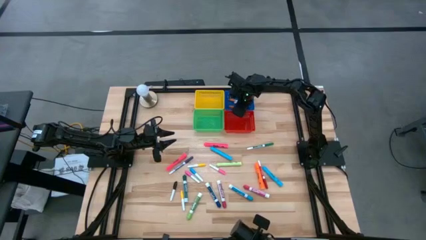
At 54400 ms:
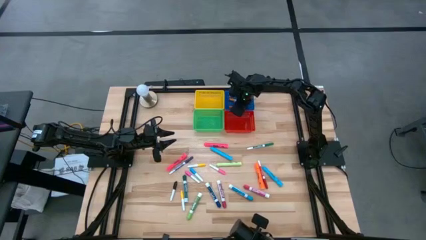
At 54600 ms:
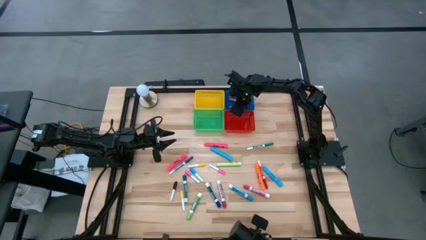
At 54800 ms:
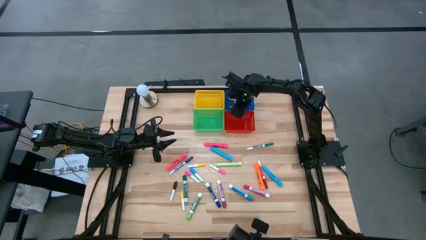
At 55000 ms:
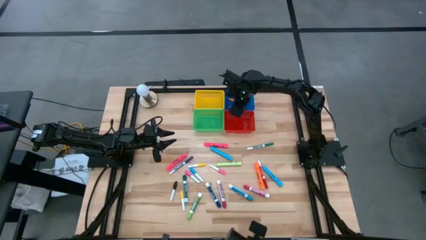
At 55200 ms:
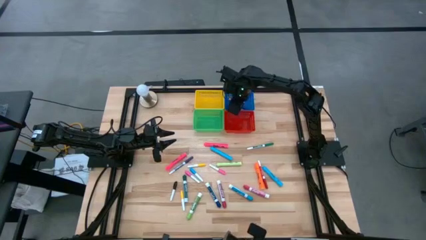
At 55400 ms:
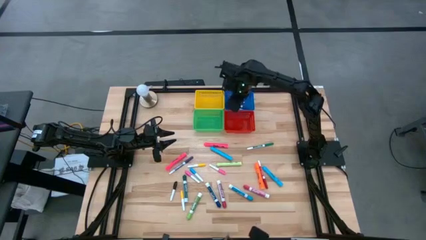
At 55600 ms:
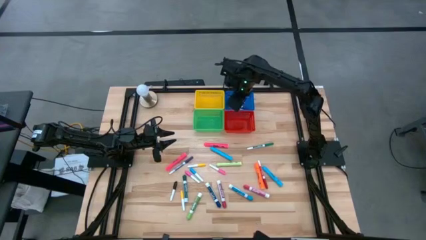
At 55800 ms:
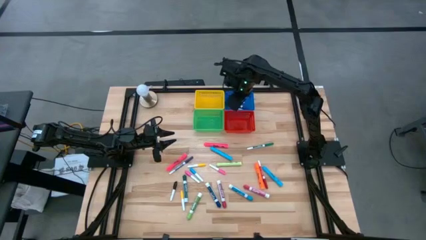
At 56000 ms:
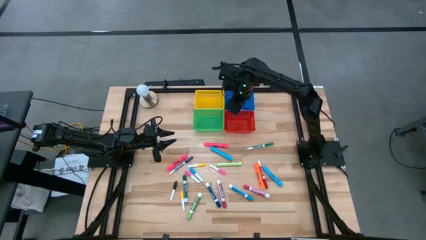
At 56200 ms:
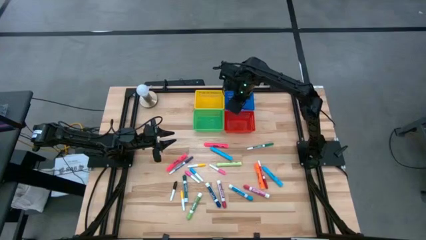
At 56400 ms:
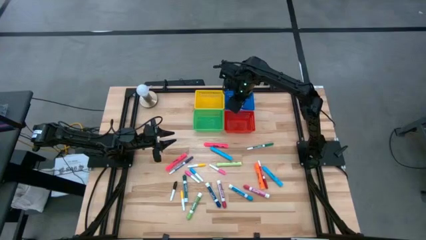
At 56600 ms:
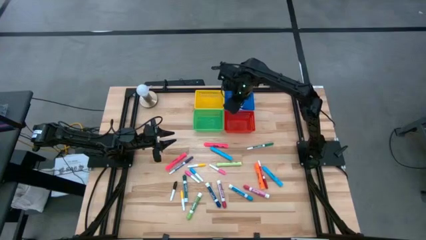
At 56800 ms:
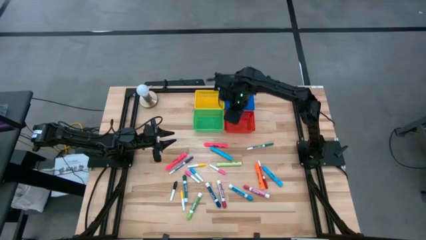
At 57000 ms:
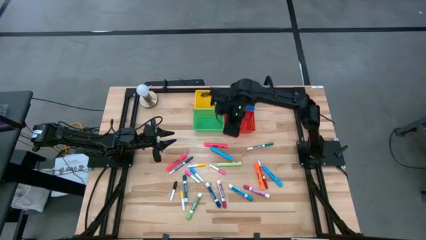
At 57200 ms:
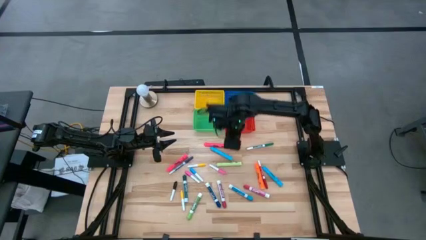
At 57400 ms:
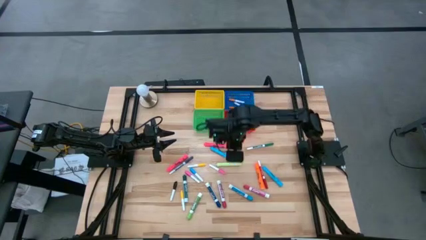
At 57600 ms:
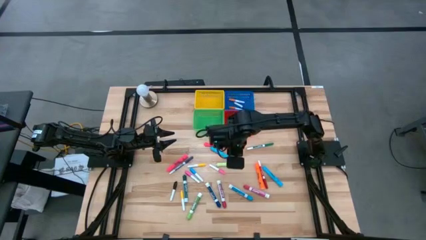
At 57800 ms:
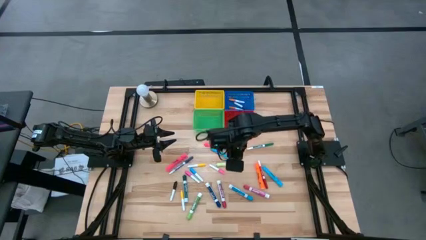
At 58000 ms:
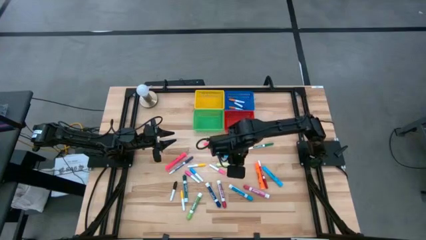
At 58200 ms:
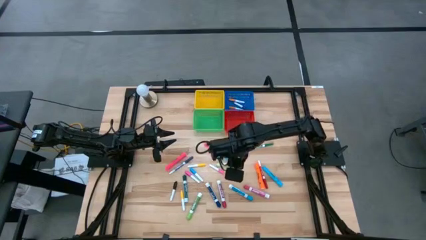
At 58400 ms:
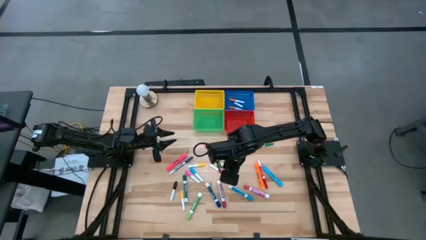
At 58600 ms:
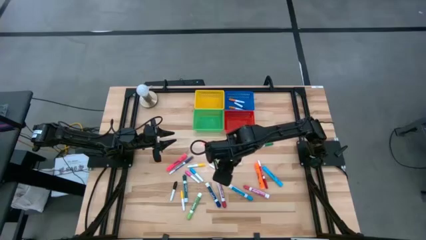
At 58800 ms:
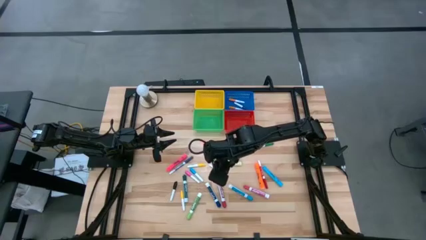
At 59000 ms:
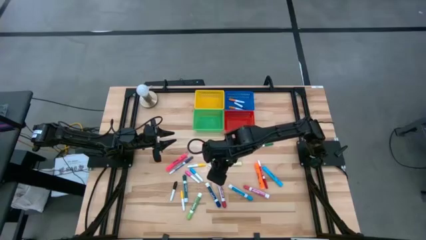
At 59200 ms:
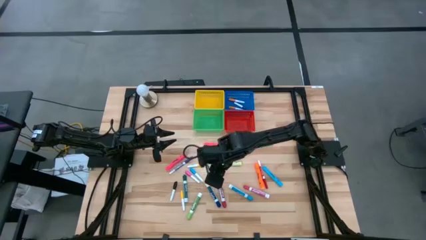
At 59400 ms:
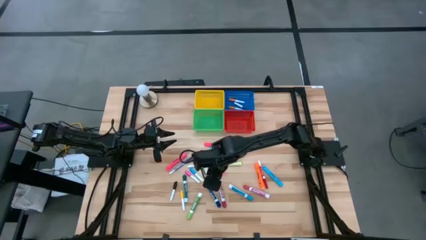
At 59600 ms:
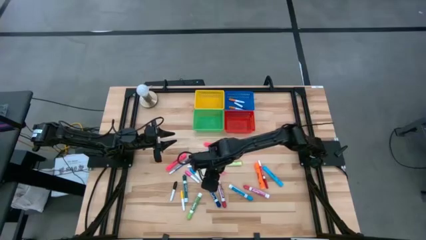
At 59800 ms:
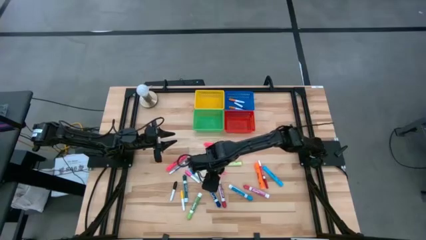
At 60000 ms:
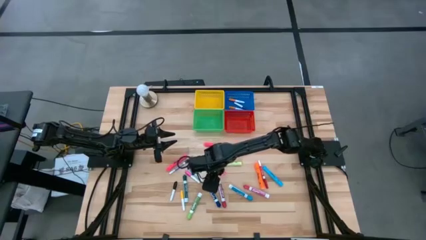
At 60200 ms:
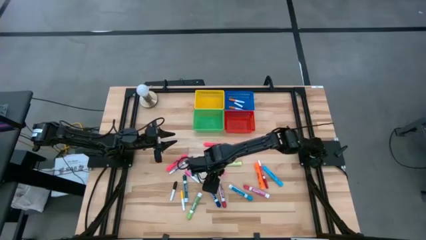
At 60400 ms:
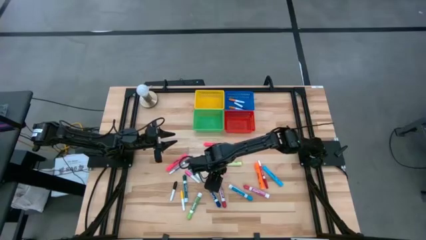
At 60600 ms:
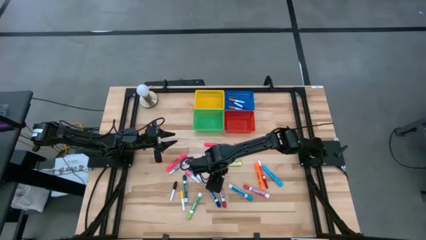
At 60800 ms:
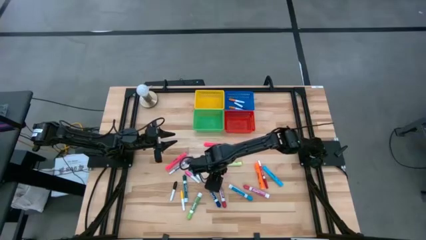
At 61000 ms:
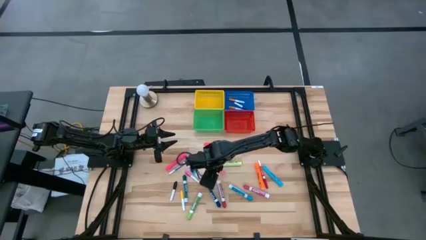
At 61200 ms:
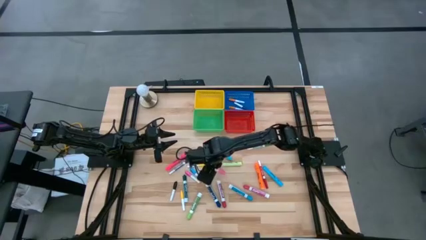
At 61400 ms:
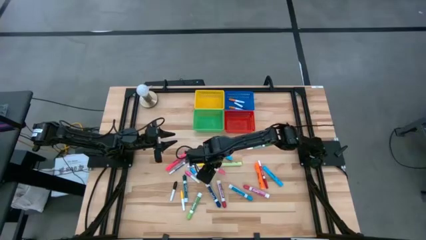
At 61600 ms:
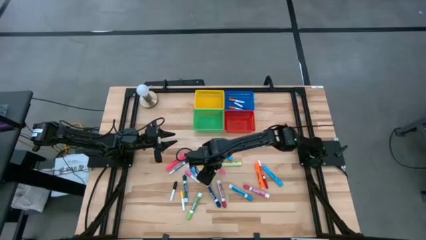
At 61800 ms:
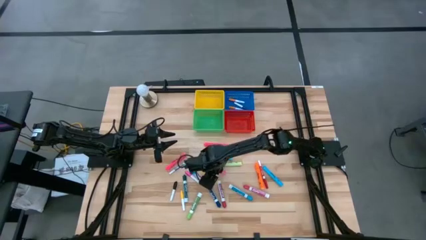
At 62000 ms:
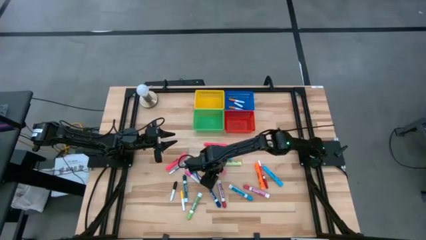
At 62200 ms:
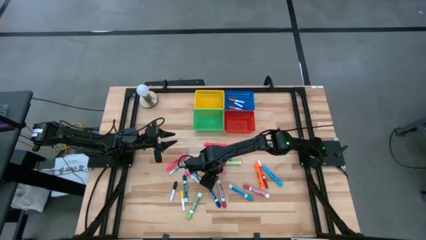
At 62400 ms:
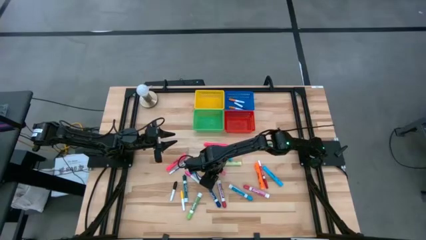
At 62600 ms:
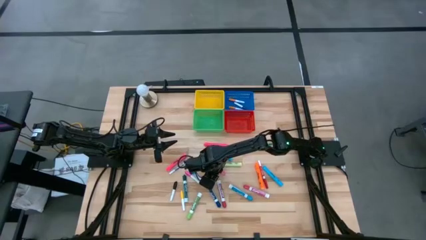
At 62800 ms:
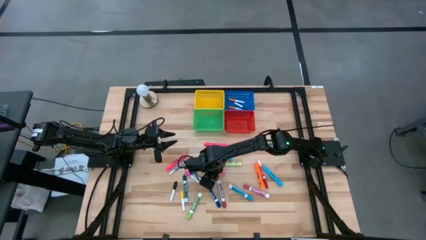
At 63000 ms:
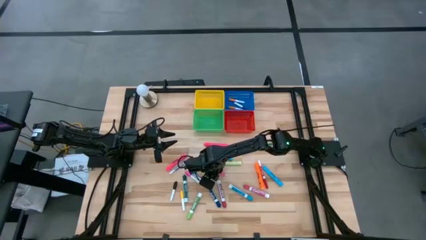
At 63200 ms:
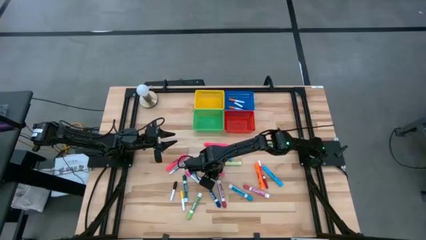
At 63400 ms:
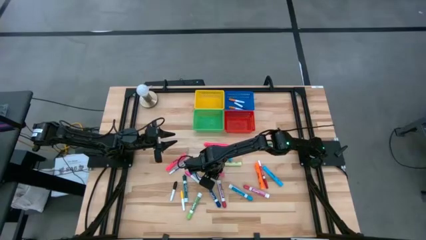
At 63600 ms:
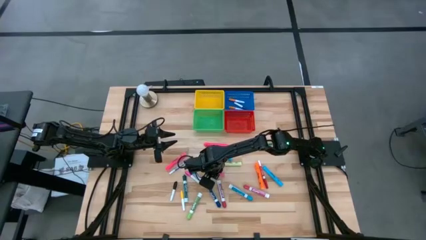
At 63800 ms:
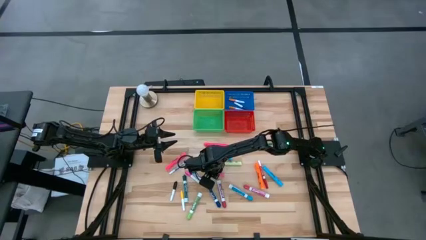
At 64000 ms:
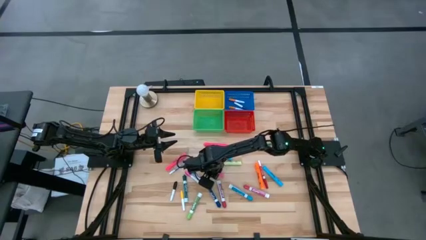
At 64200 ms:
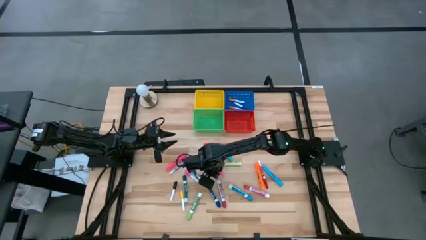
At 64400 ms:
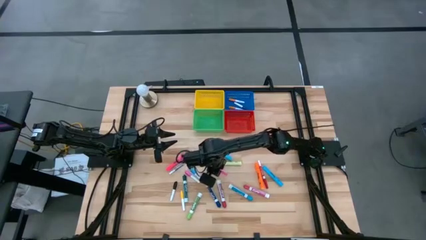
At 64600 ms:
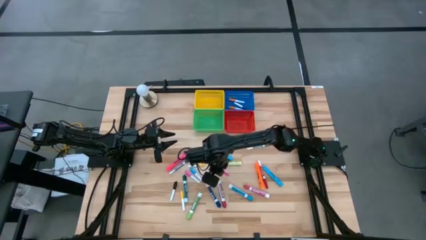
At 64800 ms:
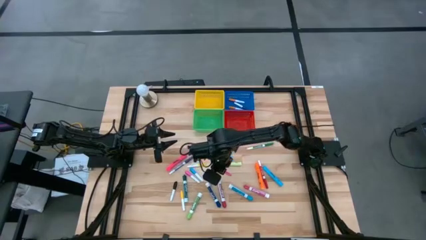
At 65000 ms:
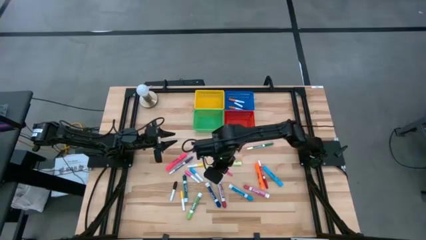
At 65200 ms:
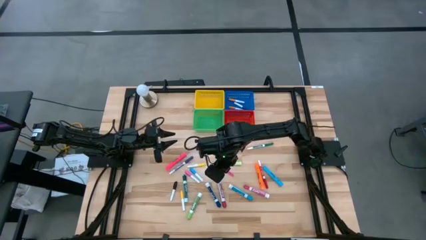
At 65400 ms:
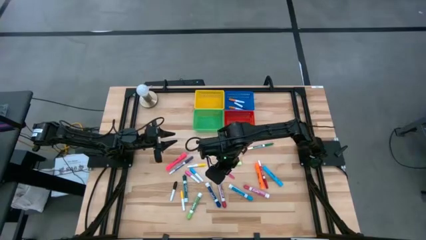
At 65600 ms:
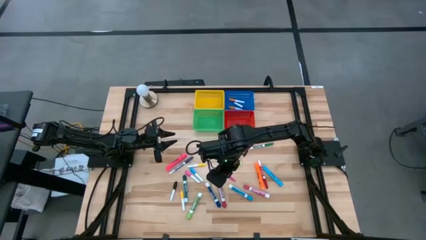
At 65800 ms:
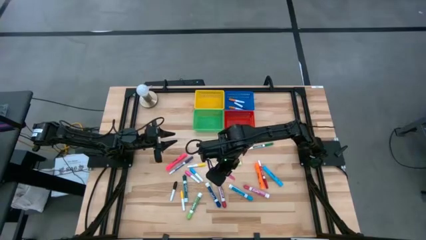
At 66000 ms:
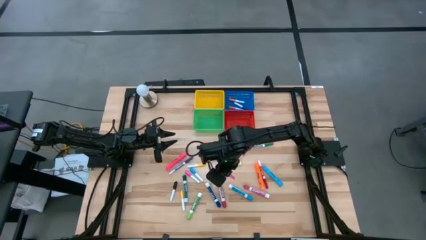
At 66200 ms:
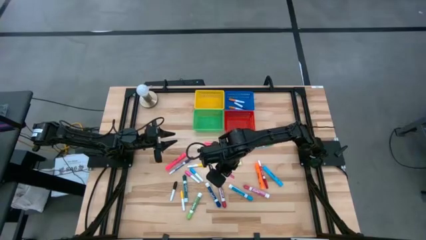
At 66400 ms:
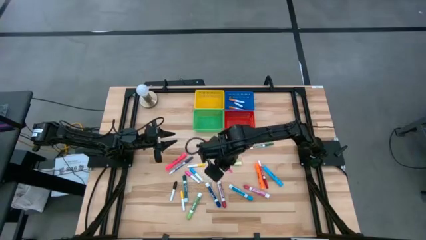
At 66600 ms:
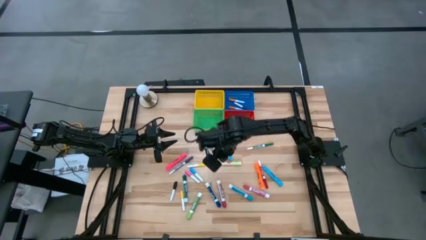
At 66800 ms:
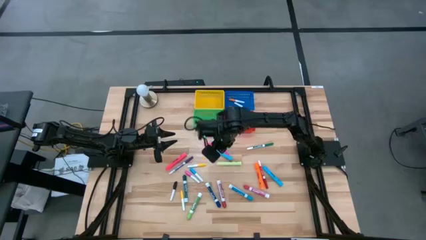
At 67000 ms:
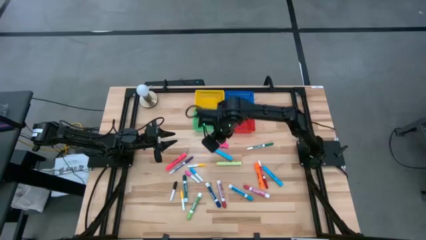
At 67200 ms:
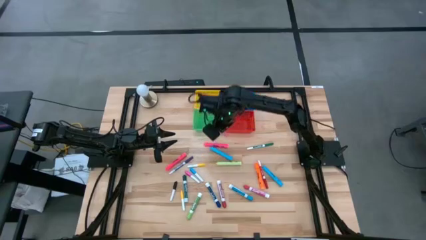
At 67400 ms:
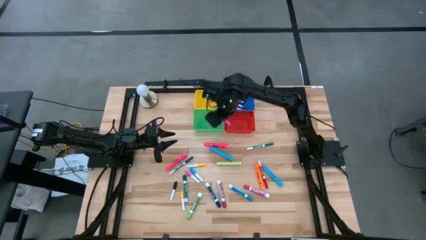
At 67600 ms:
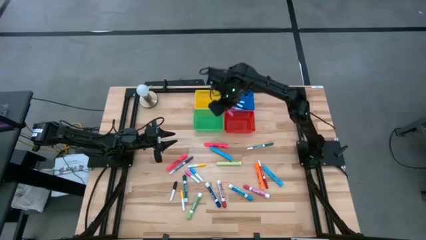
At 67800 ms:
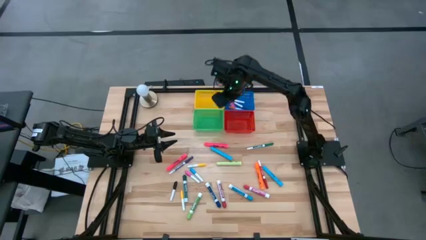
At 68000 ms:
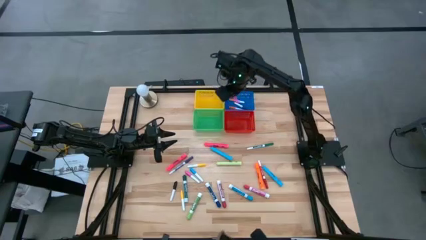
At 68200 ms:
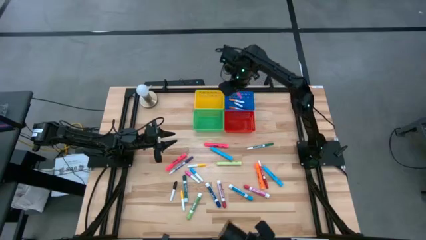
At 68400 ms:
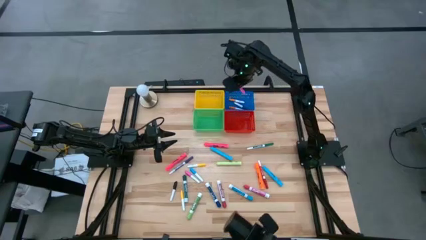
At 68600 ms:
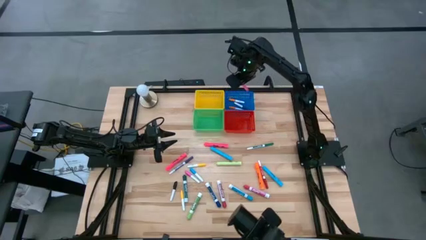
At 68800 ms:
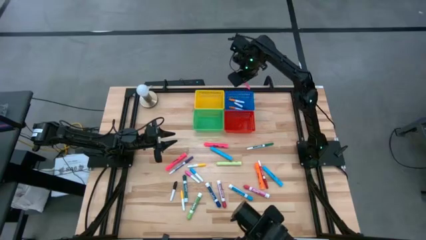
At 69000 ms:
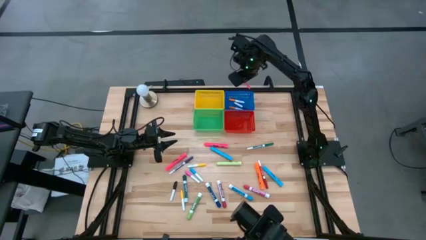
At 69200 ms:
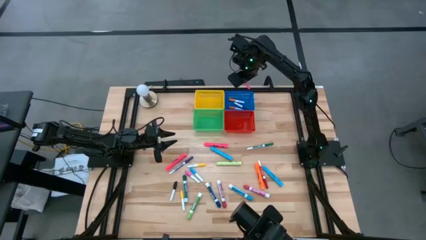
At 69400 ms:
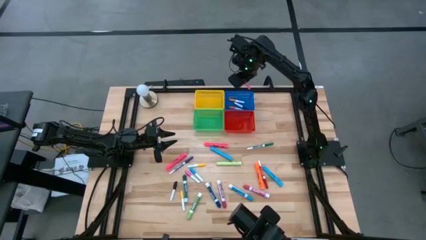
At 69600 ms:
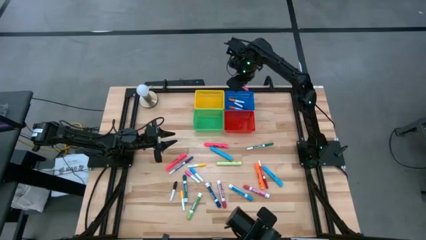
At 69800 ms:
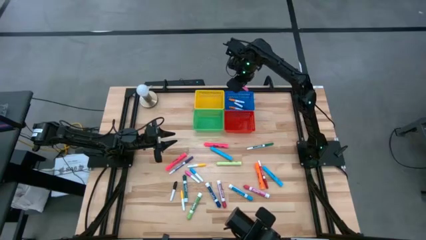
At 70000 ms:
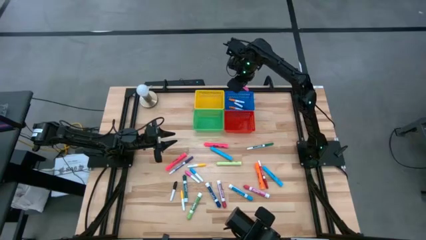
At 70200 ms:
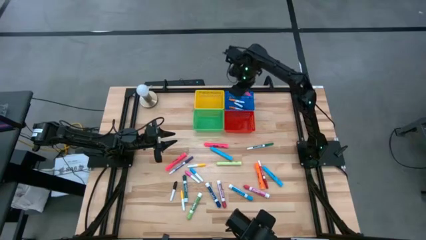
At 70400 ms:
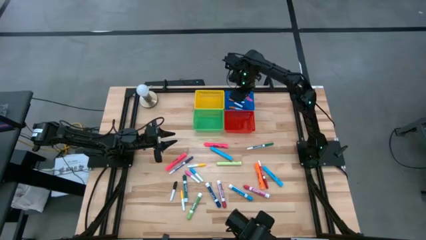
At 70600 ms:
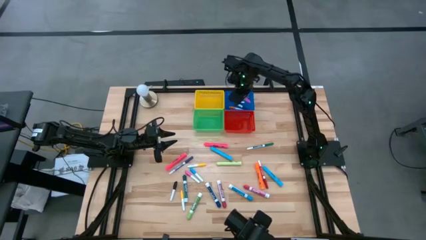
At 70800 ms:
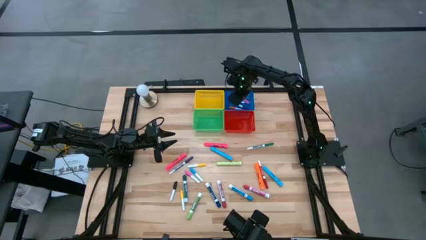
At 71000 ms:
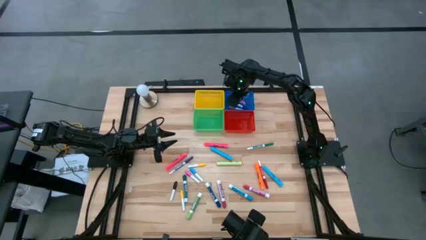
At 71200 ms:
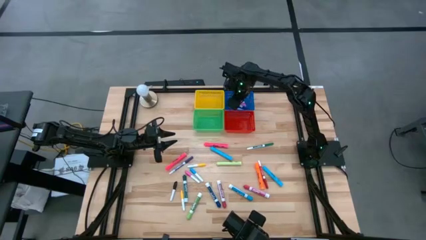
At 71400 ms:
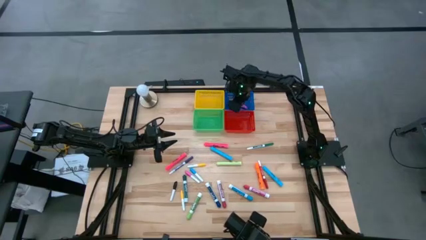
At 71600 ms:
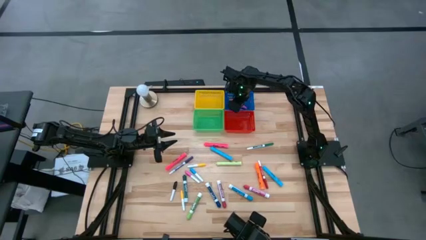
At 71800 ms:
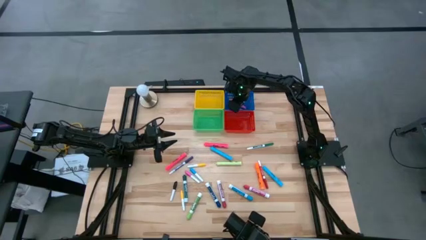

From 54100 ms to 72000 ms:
Task: Pick & Place Markers
Put the small pink highlighter pen into the blue bin
